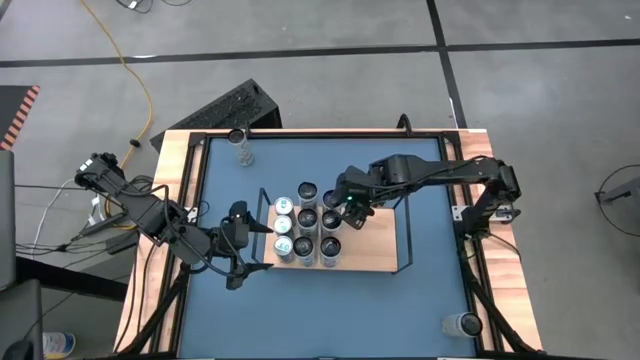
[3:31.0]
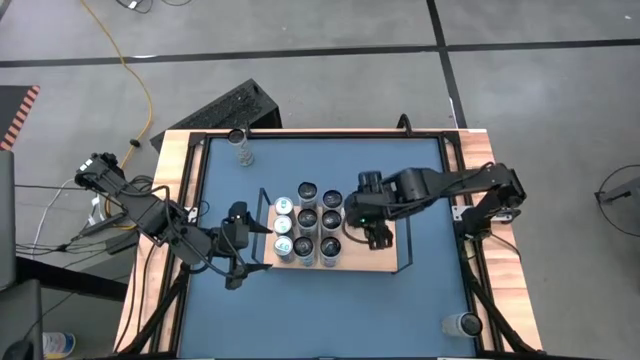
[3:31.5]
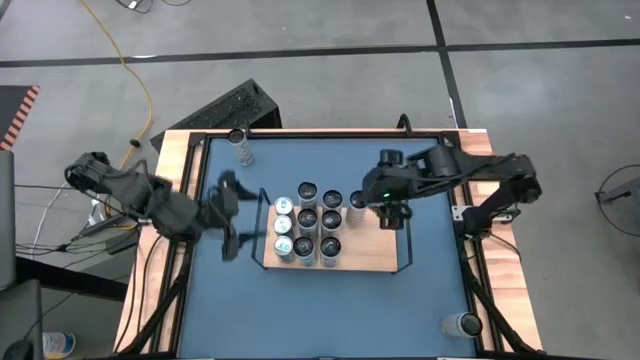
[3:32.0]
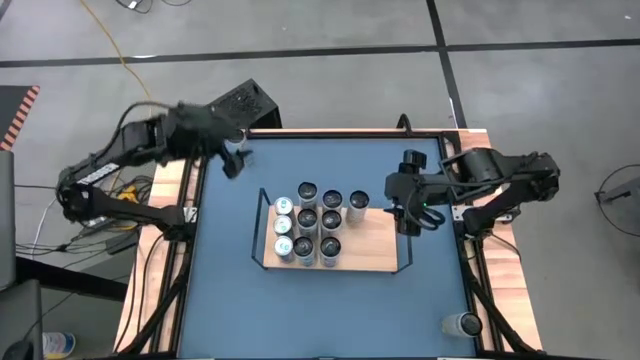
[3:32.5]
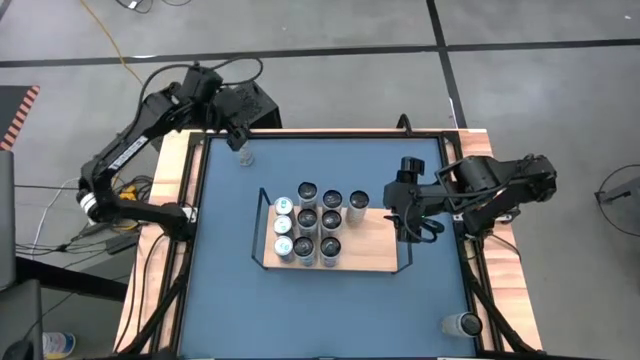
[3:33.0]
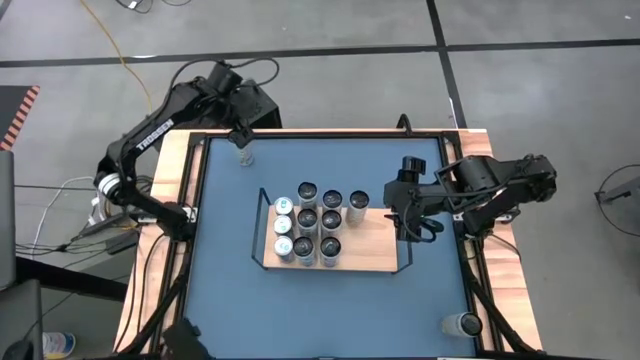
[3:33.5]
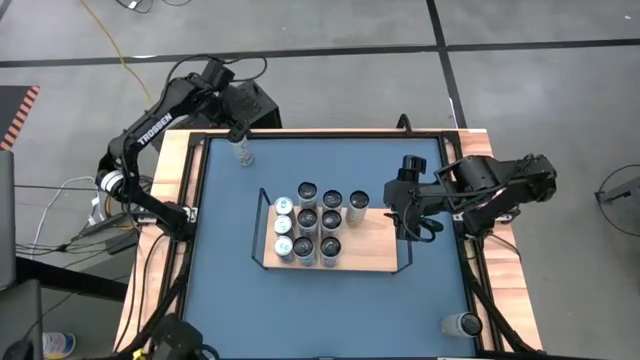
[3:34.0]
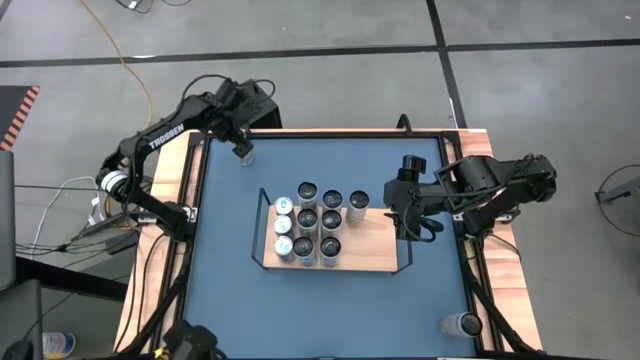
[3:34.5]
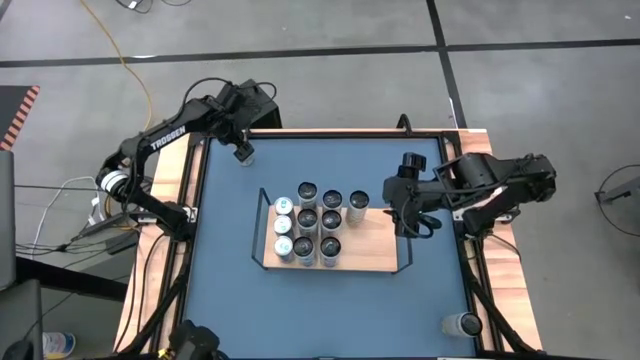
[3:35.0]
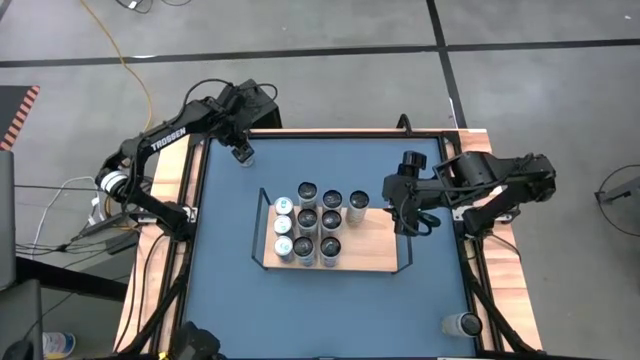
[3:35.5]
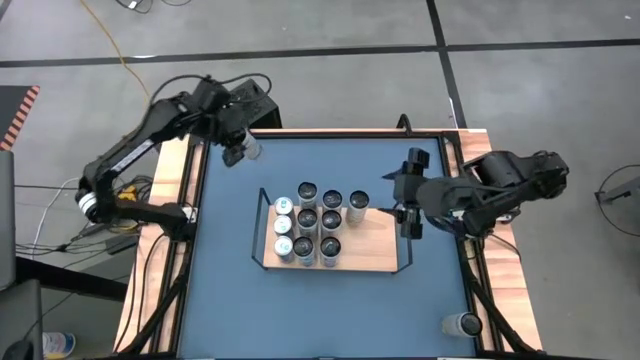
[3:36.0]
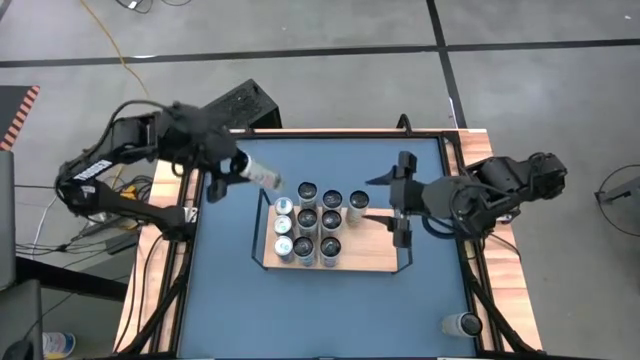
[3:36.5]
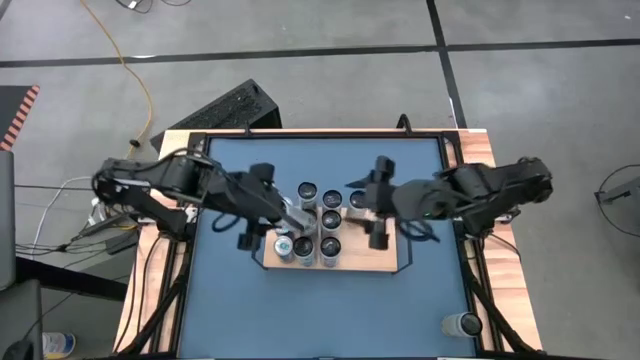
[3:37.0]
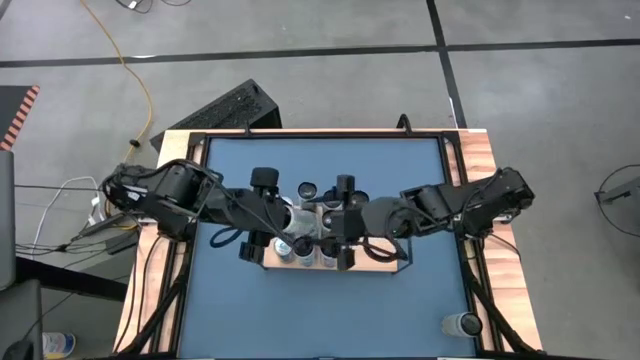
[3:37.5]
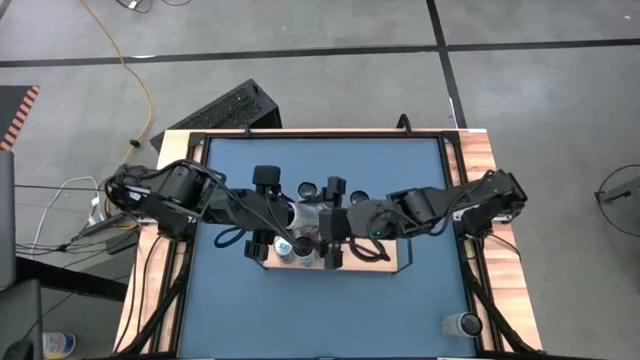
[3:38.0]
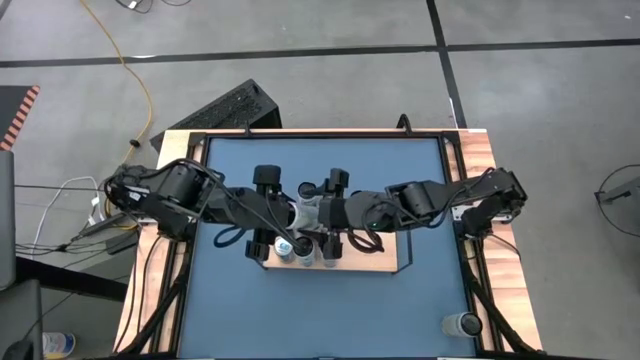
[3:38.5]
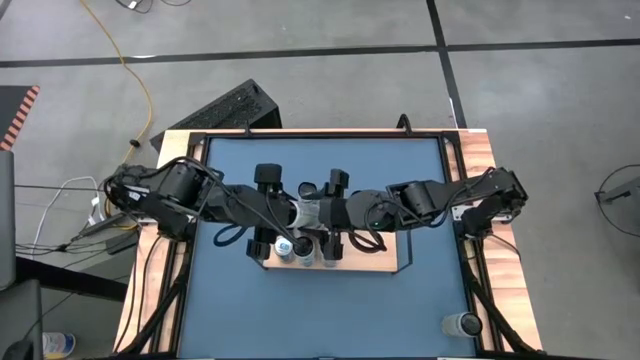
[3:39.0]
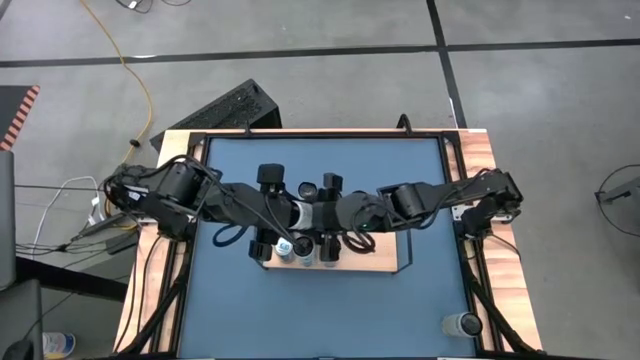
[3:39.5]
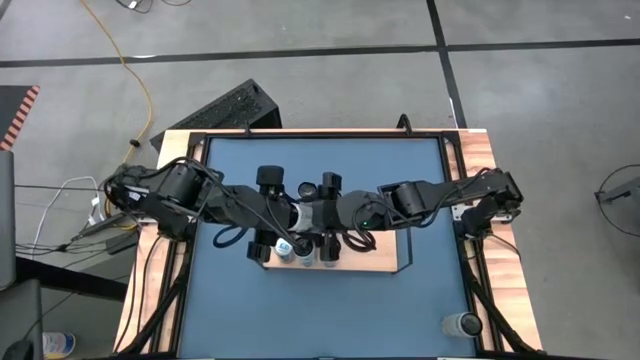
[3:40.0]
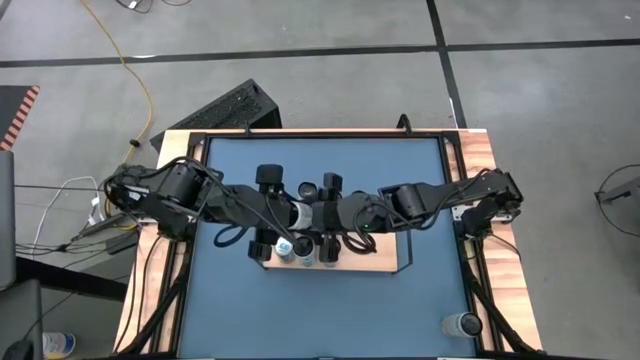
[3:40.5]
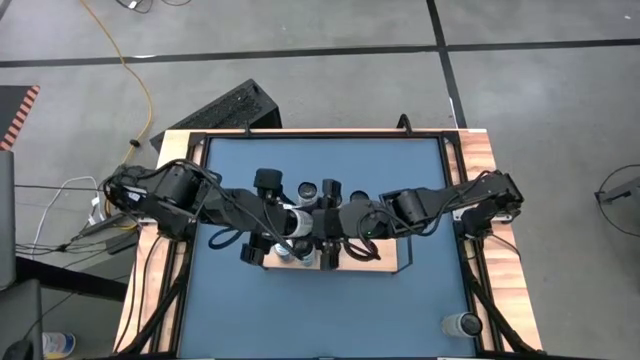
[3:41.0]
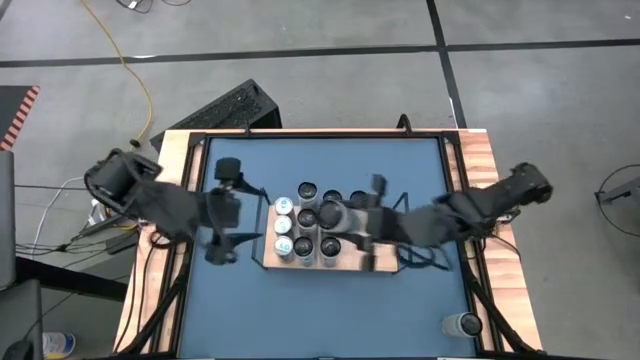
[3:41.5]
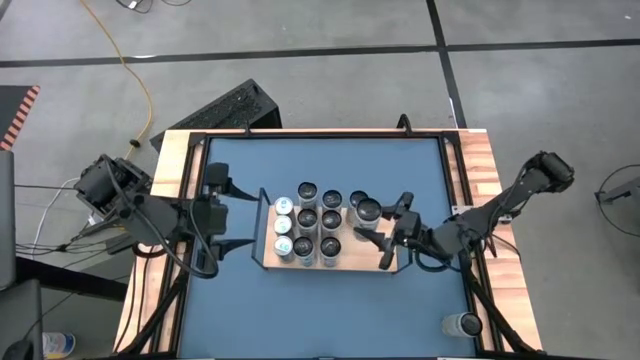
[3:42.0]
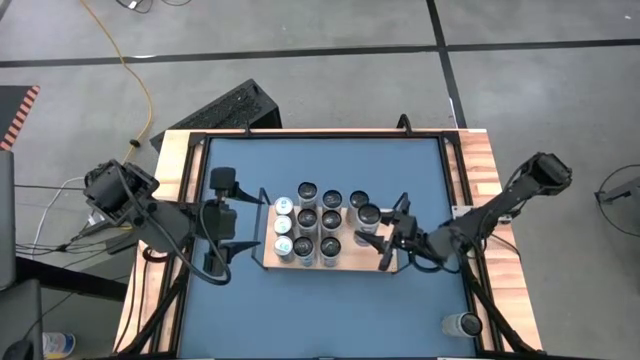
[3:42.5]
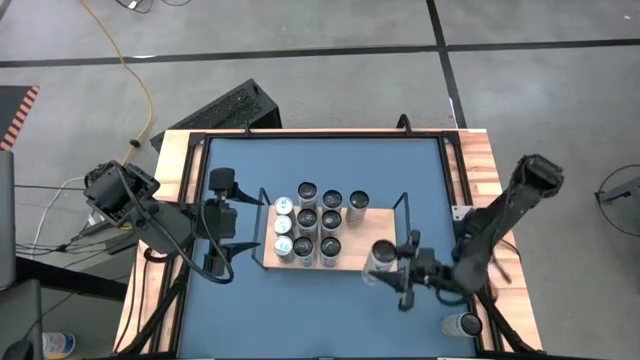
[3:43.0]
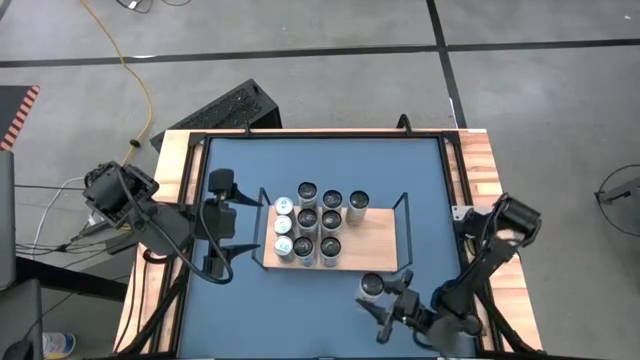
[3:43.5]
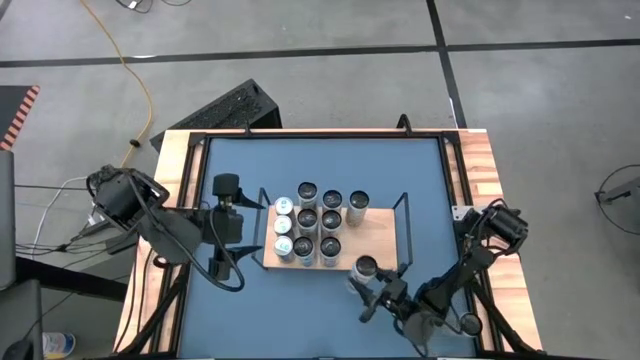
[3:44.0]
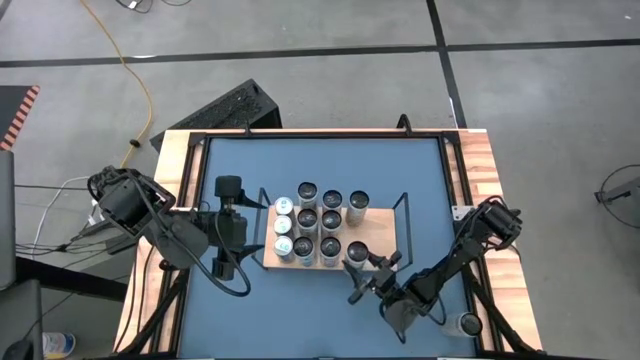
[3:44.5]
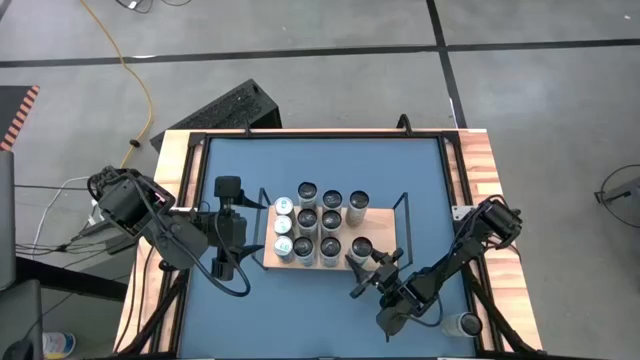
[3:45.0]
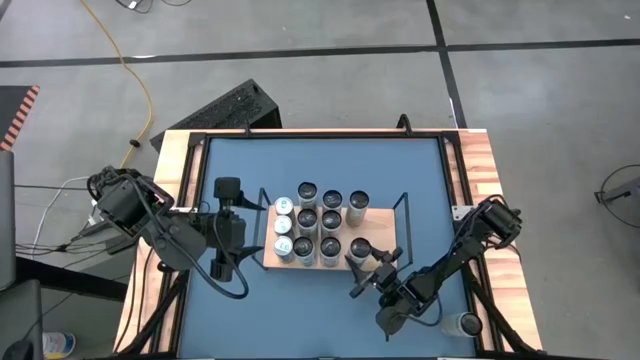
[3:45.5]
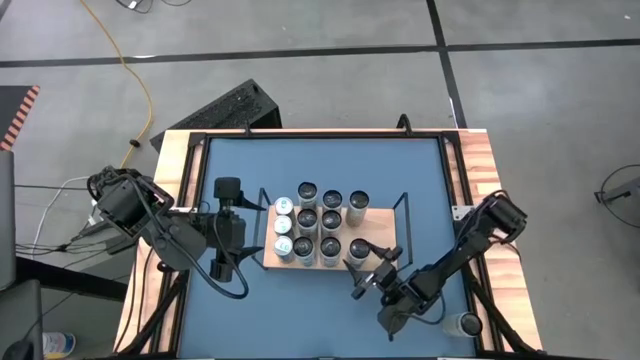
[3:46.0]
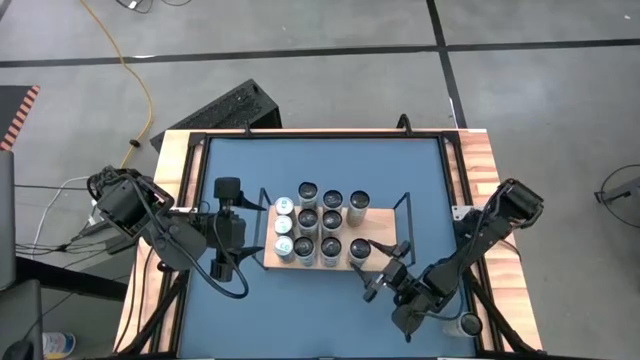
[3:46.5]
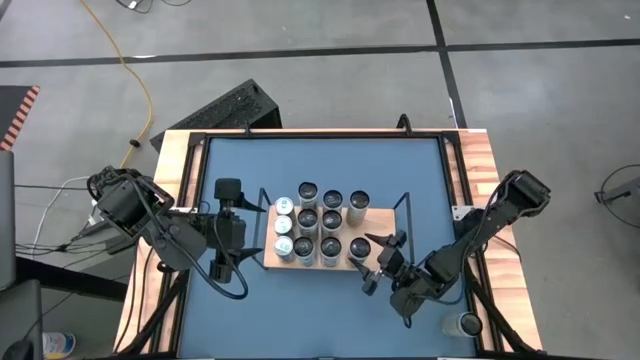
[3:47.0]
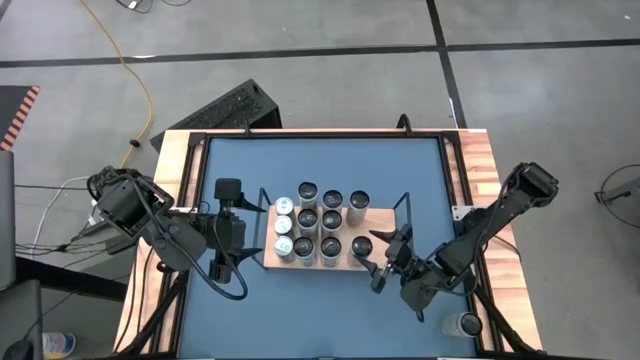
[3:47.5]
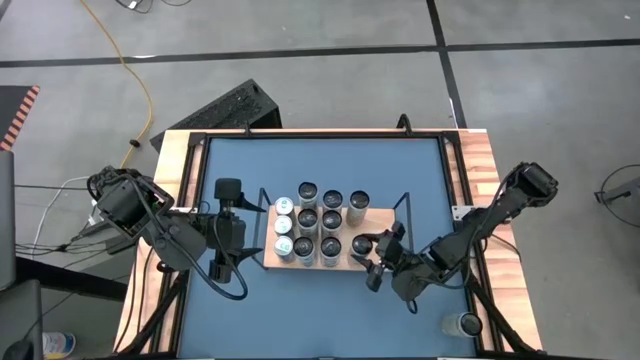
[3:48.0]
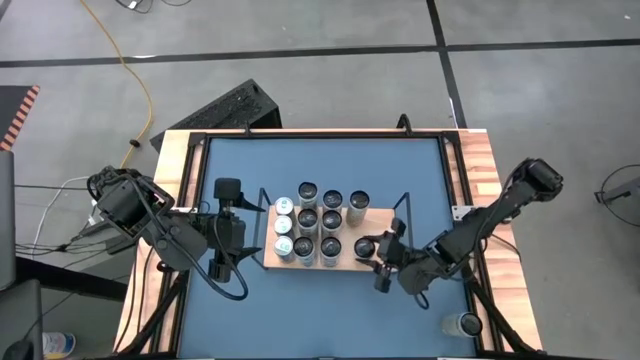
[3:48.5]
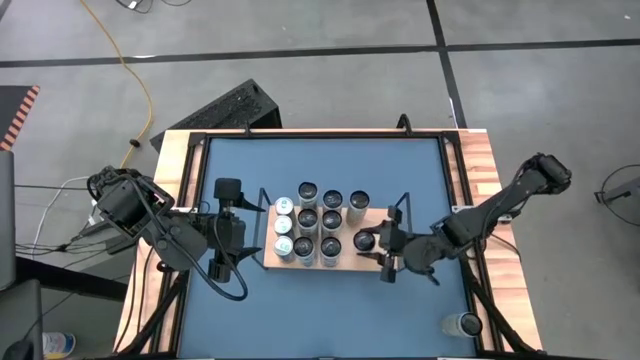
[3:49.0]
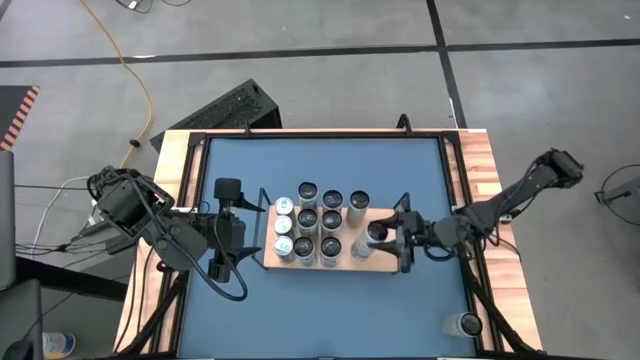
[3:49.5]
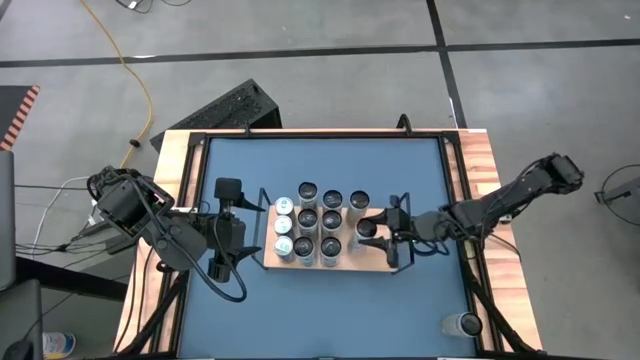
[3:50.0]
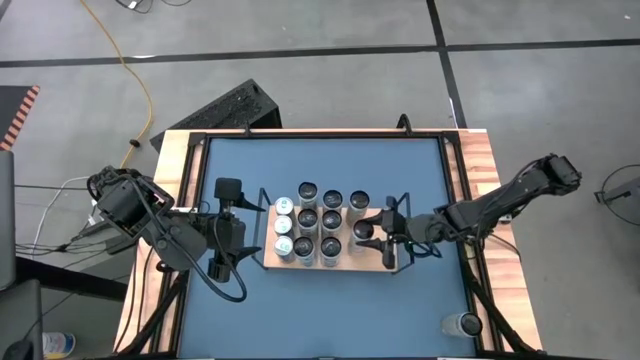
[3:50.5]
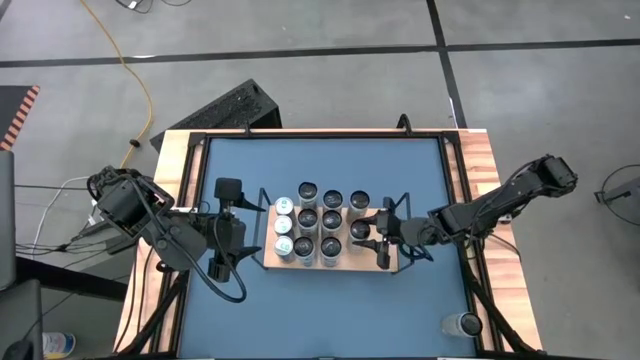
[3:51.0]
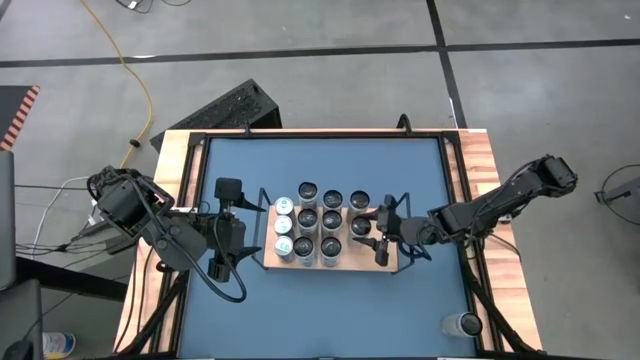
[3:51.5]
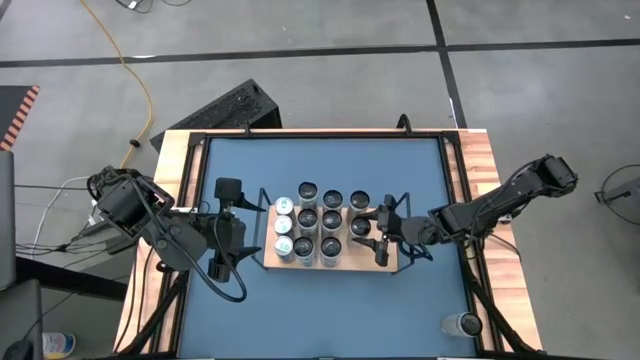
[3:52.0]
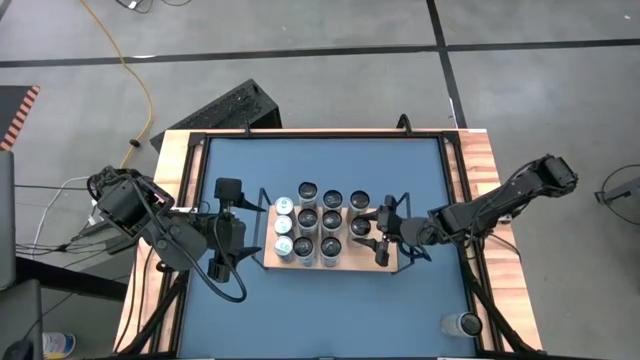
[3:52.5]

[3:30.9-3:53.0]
Task: Place canned beverage on shelf
Put the top yellow soda can on the shelf aligned with the other yellow soda can
